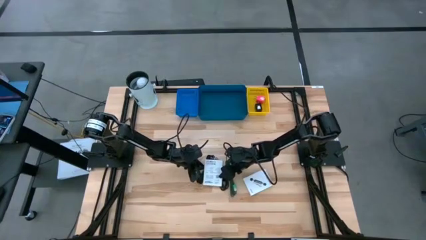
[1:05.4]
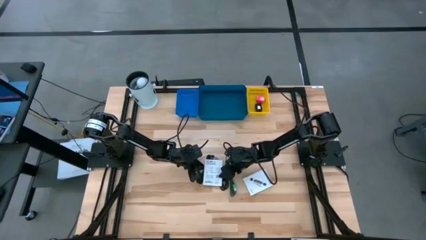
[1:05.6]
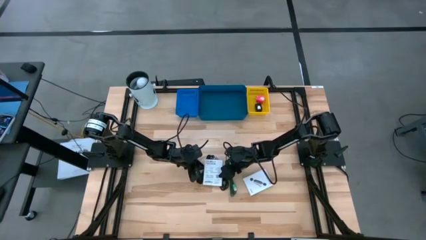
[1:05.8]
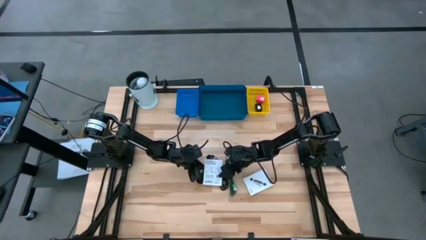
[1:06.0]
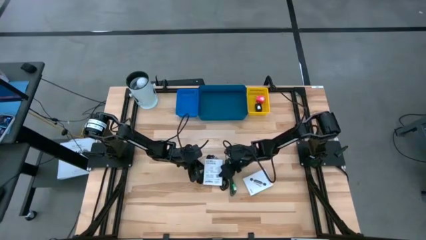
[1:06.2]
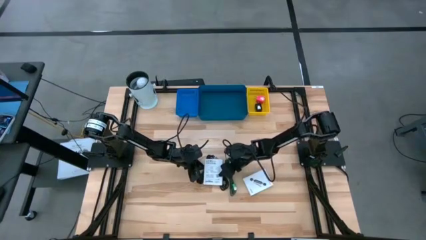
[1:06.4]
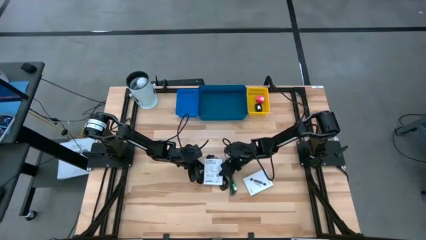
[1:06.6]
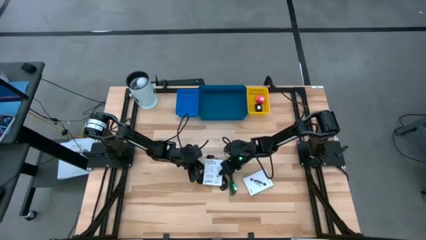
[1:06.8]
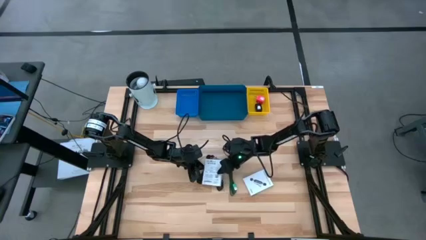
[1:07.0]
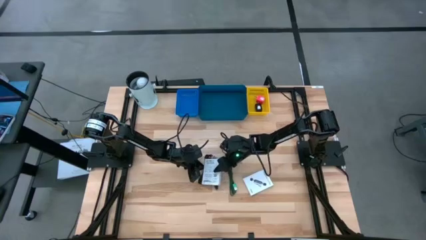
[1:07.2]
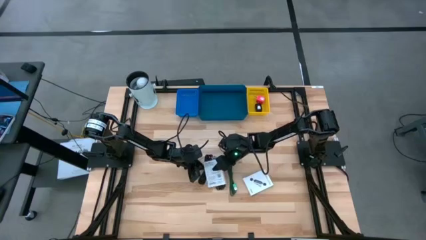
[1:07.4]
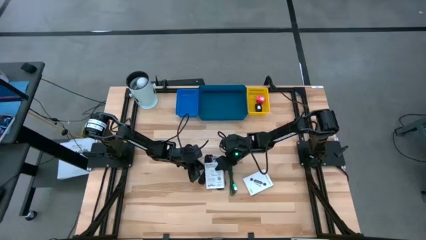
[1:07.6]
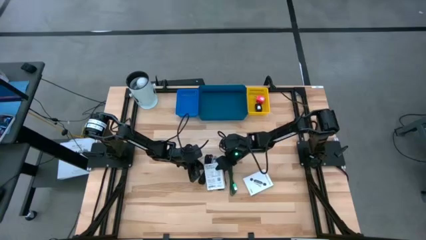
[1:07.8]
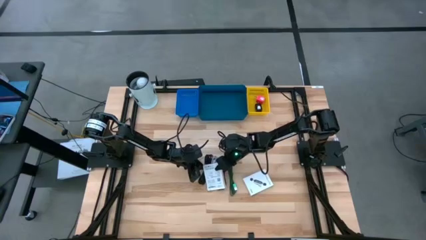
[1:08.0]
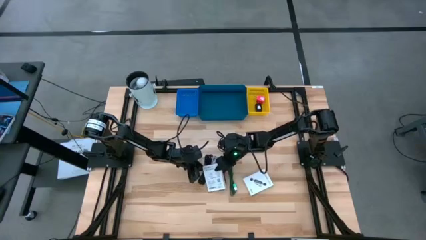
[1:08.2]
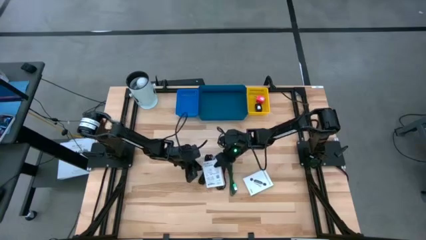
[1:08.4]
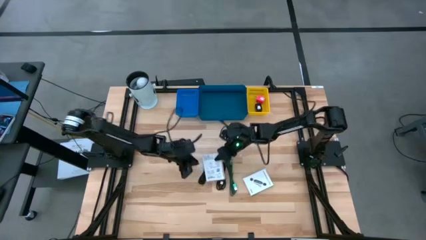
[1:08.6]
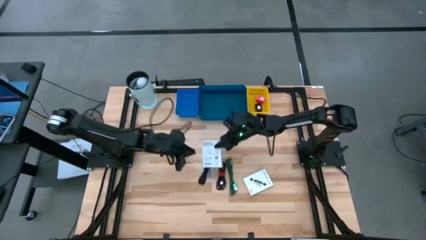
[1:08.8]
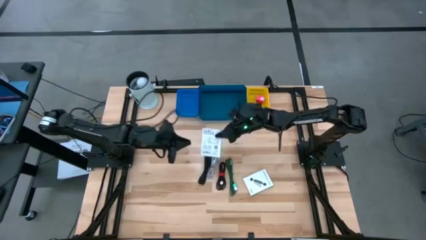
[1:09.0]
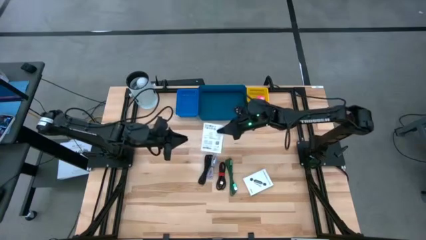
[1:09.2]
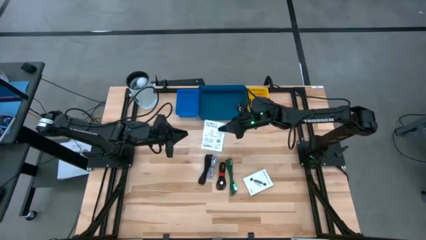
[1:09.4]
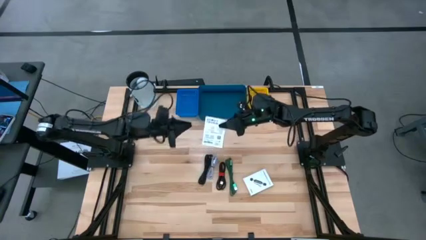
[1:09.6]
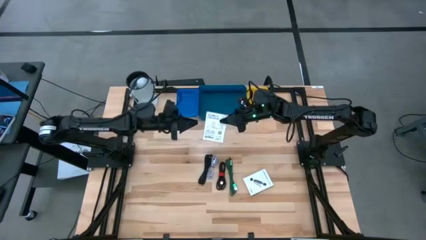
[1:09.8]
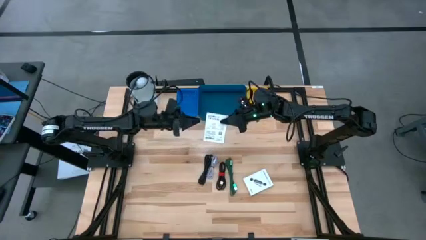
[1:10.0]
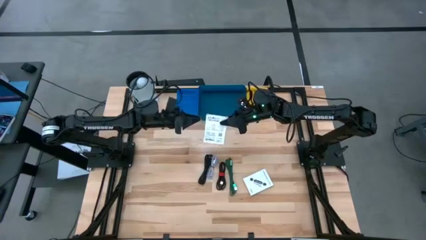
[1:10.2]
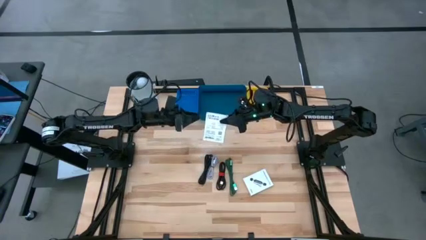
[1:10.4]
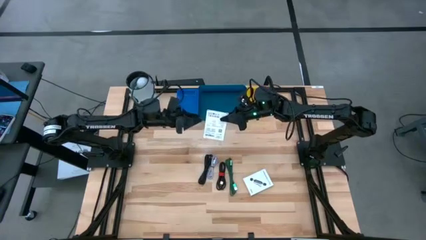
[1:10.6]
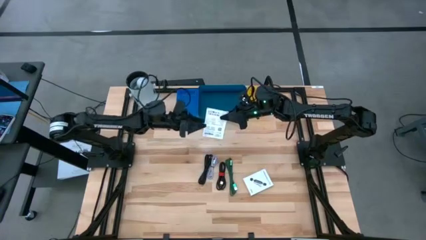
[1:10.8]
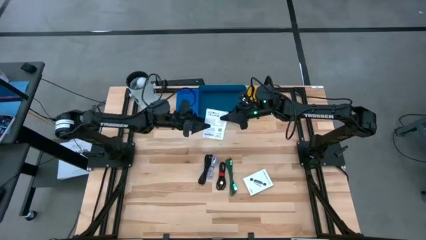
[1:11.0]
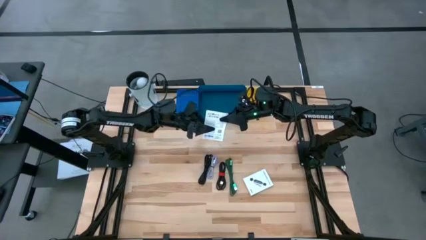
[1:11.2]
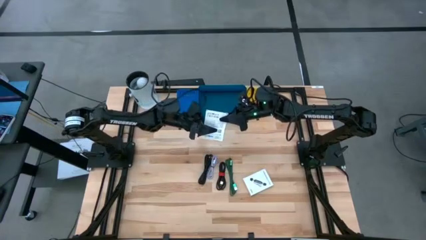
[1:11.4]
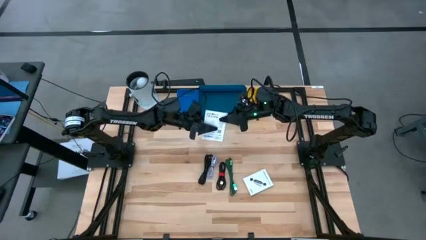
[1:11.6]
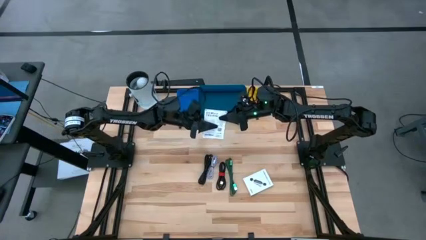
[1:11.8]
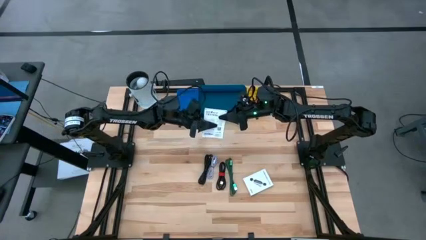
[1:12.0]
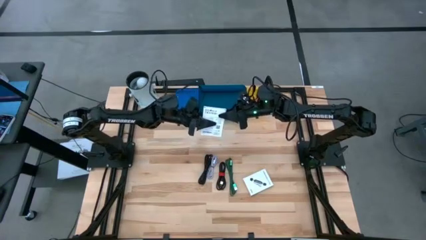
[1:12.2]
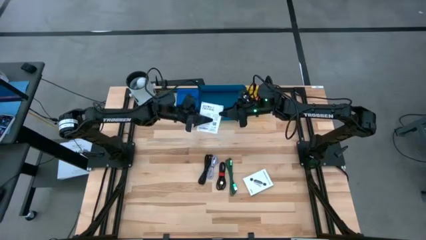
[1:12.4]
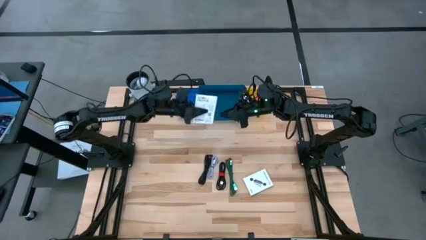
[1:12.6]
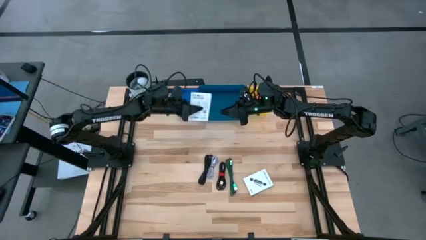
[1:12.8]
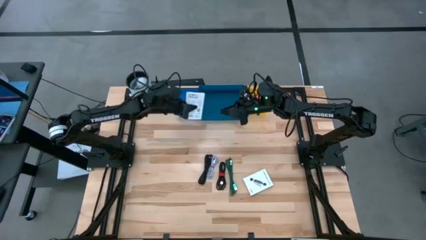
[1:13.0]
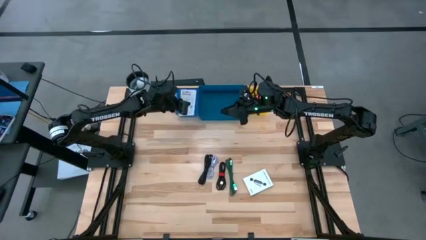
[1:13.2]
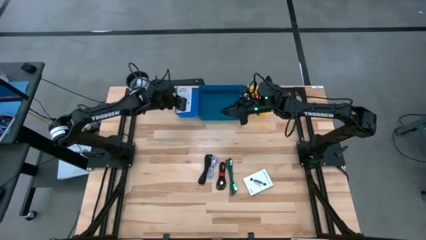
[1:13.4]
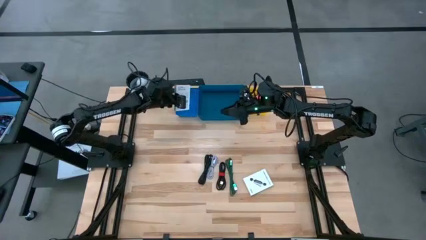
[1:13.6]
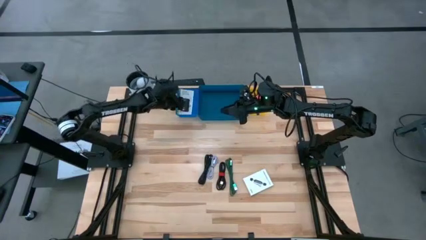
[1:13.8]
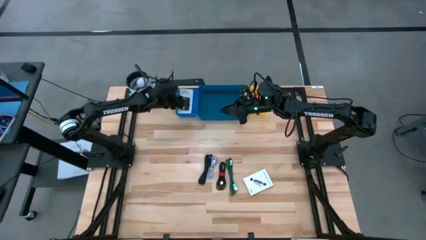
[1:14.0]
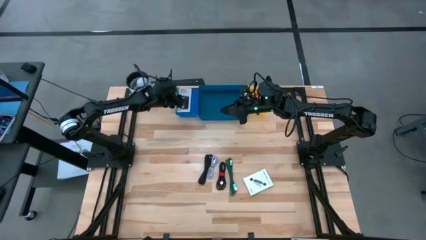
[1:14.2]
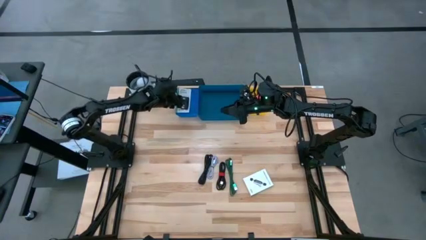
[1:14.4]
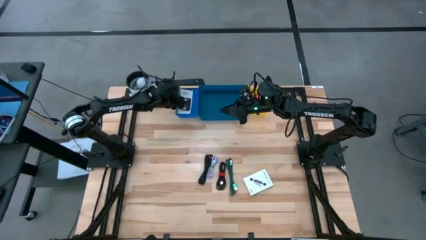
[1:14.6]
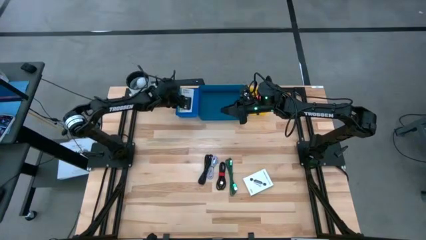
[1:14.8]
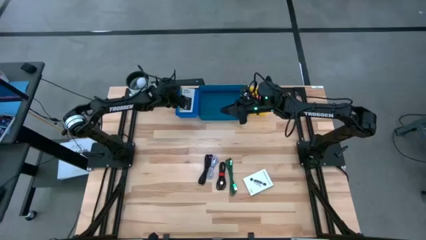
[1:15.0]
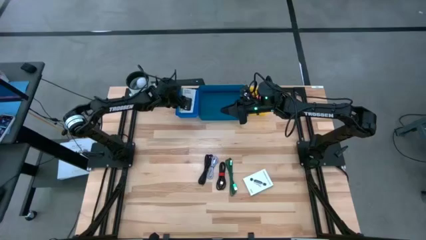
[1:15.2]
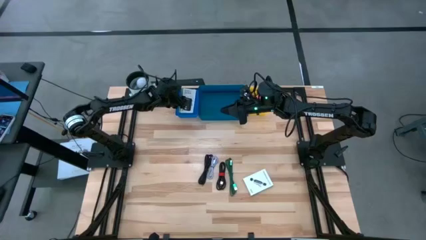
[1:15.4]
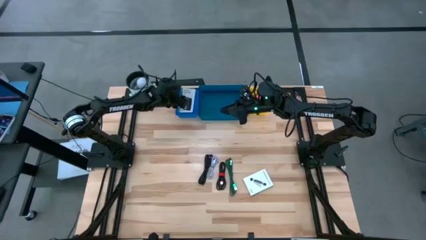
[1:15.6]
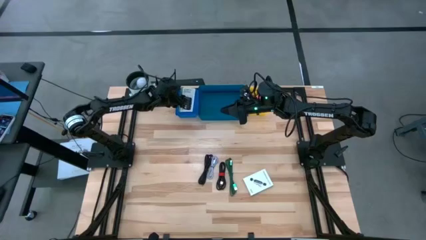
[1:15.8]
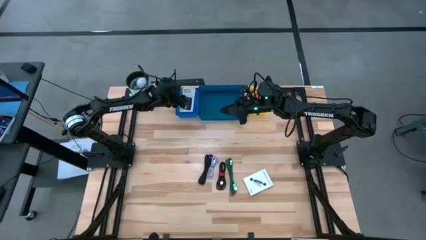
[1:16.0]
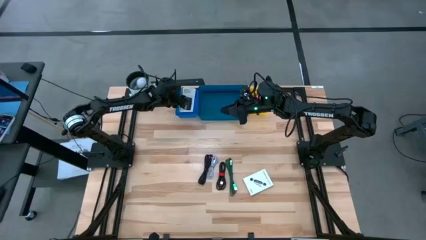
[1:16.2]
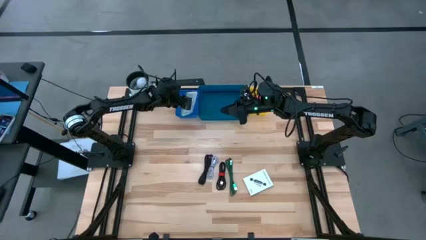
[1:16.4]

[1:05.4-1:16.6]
Task: Pick and place items into bin
Put the left card reader box into the blue basket

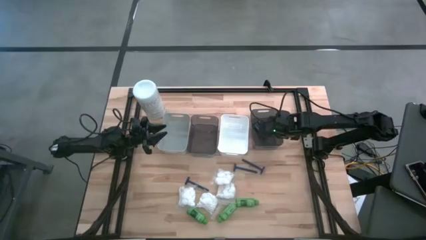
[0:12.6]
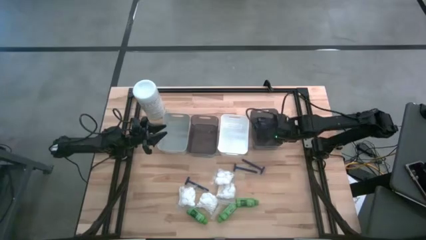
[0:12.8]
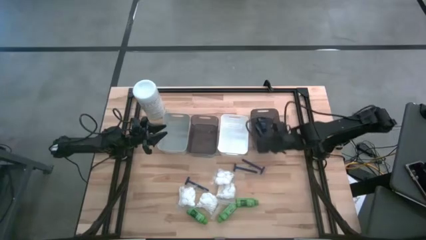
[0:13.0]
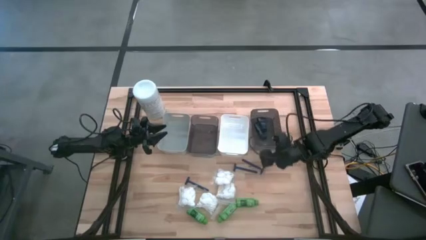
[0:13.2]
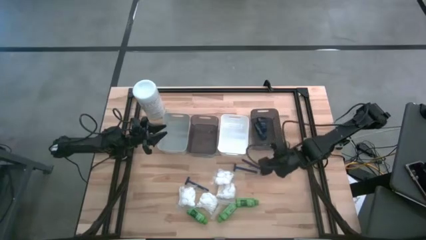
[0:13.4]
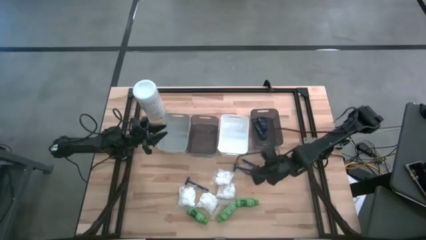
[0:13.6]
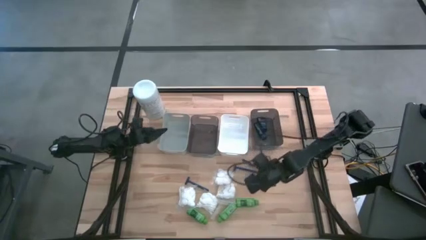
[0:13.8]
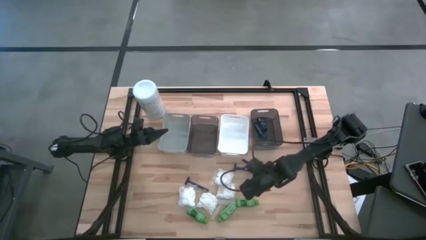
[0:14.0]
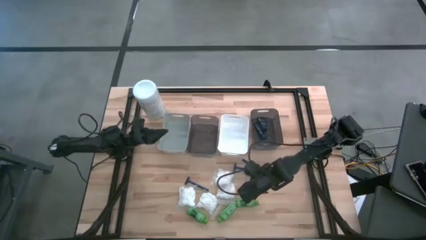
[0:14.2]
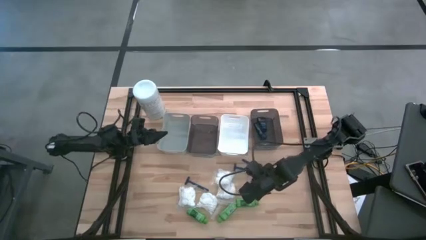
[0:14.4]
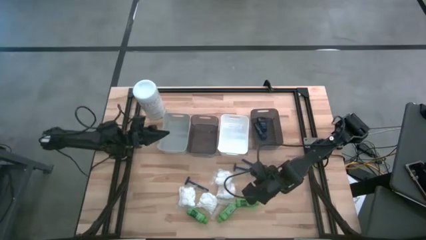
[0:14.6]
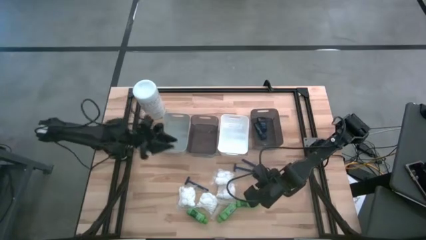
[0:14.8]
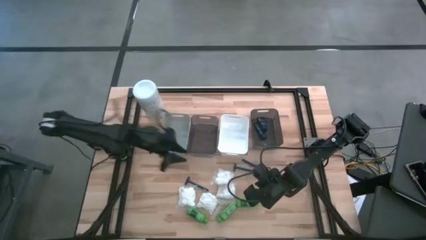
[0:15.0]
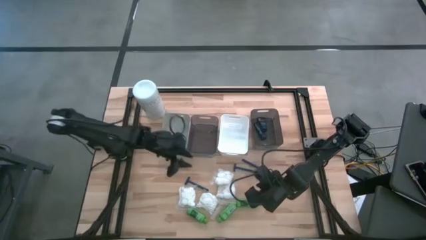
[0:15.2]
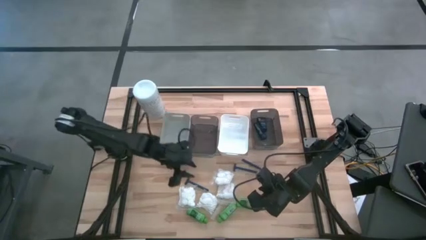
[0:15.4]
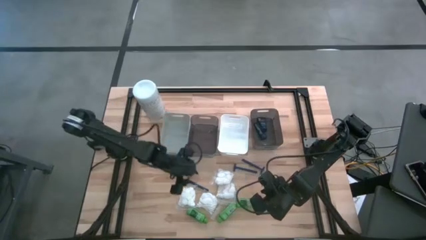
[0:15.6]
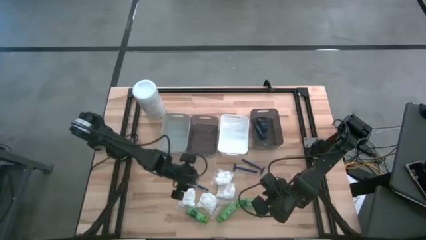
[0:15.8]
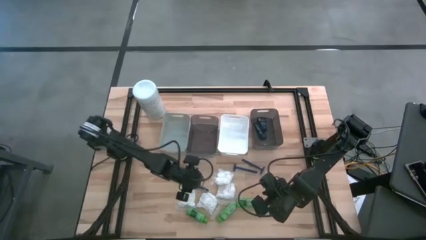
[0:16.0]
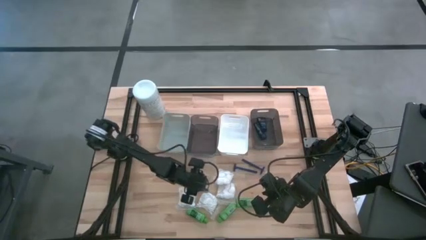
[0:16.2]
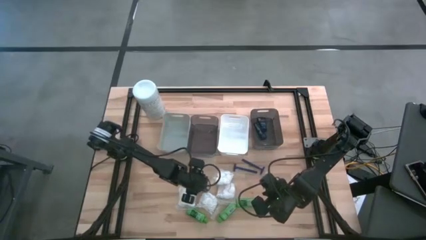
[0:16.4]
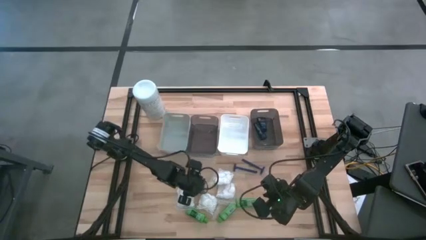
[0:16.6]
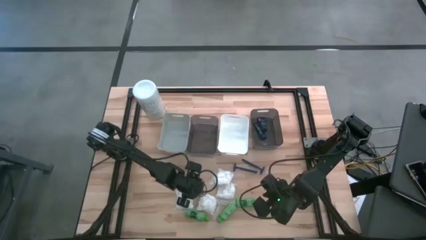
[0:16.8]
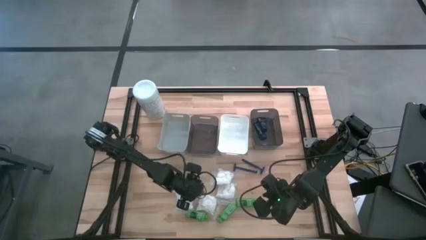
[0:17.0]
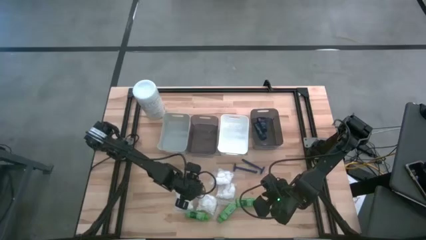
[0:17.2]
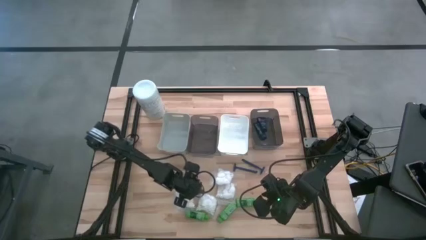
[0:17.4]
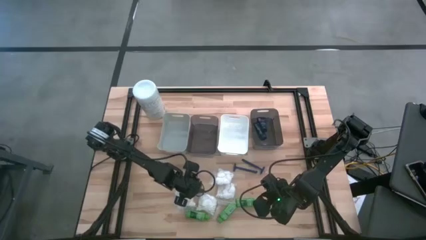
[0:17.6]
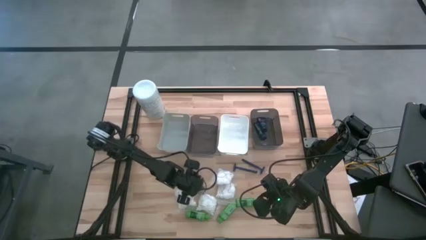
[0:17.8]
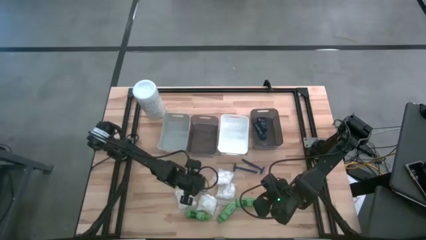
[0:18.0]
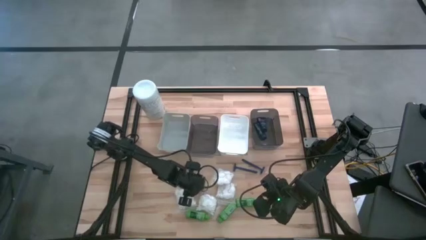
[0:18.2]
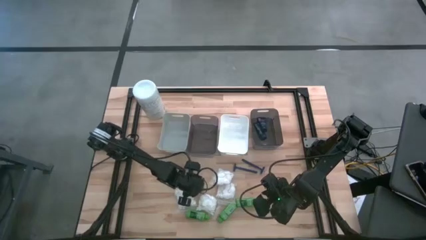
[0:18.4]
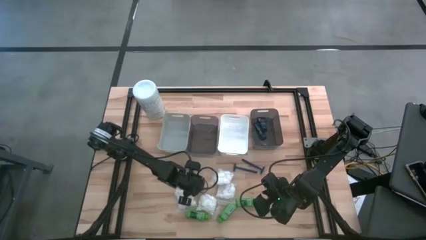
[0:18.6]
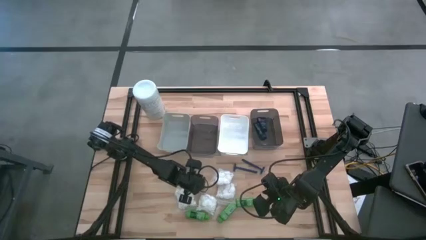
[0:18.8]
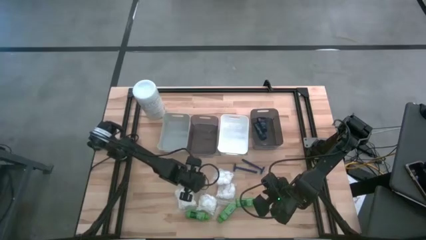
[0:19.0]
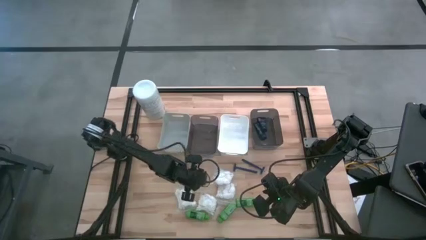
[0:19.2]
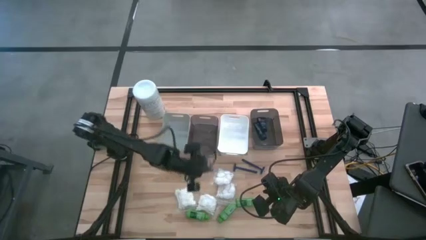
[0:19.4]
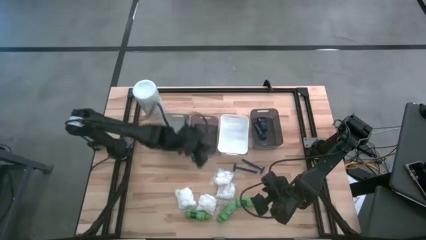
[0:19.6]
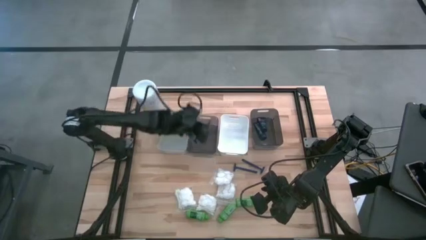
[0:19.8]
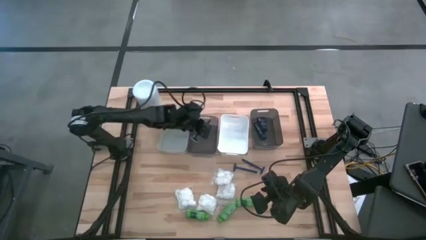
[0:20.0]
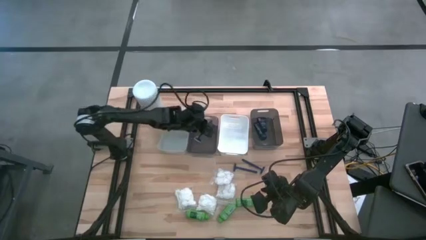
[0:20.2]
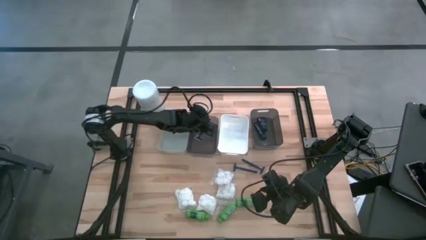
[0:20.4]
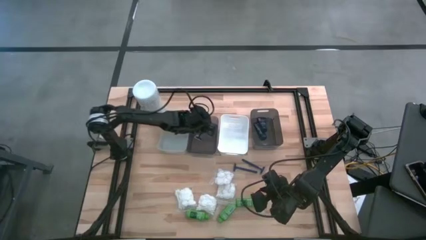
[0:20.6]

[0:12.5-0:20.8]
Task: Pick & Place Travel size toiletries
Put the blue razor into the left black bin
